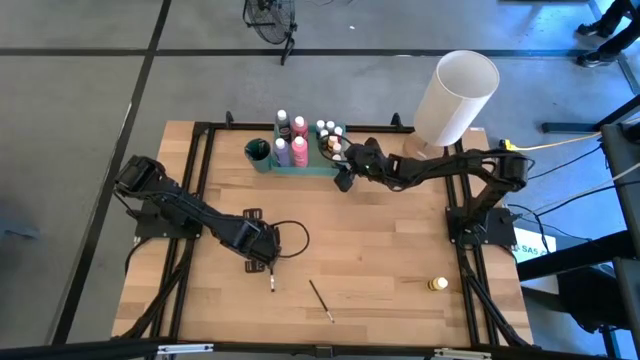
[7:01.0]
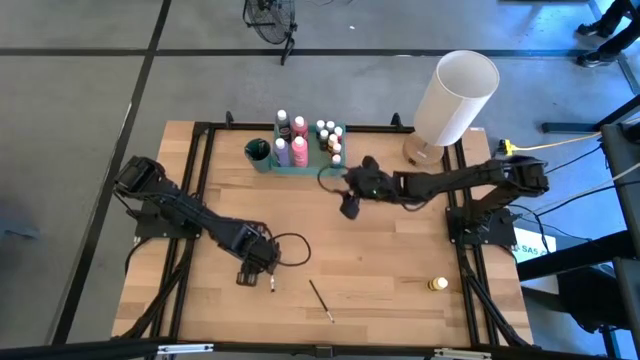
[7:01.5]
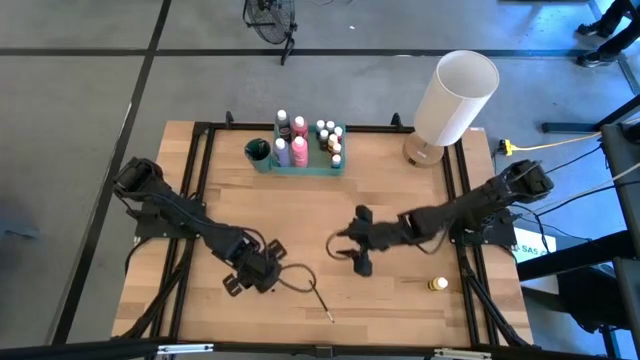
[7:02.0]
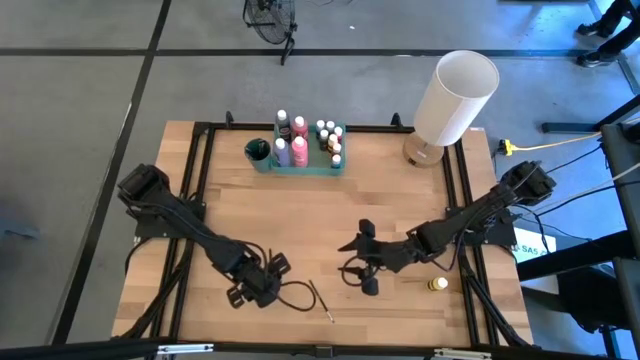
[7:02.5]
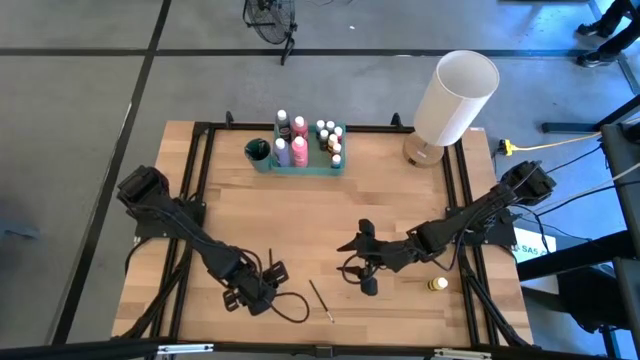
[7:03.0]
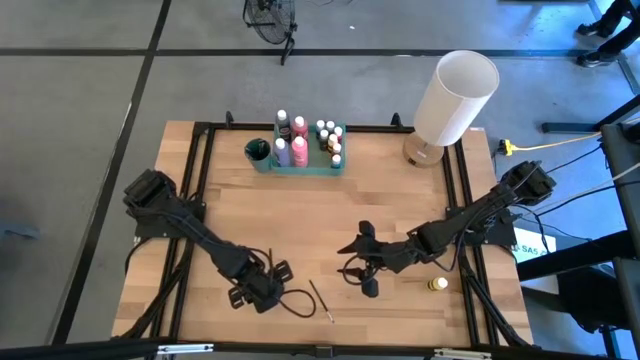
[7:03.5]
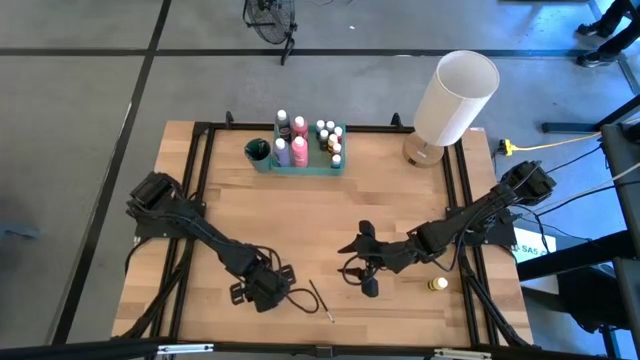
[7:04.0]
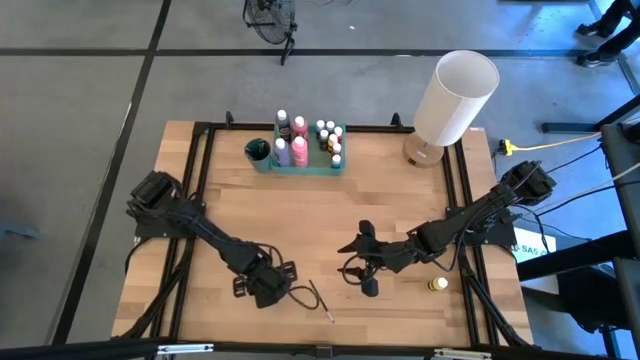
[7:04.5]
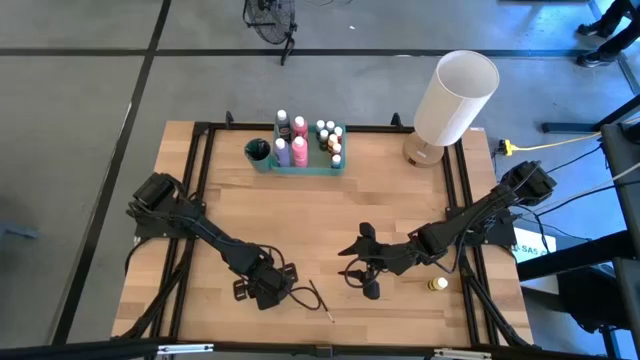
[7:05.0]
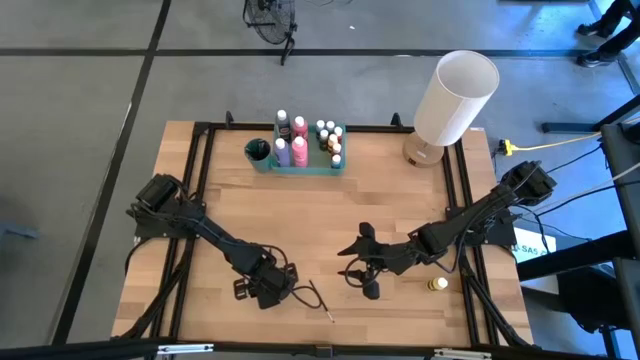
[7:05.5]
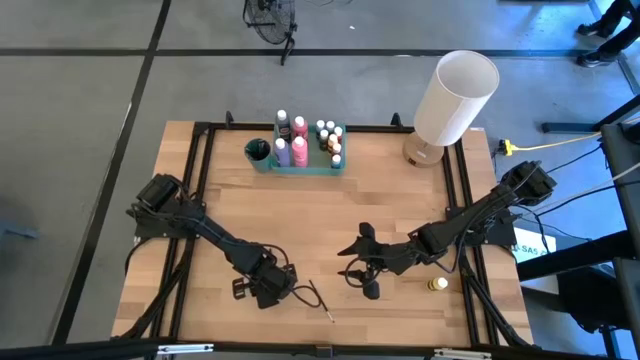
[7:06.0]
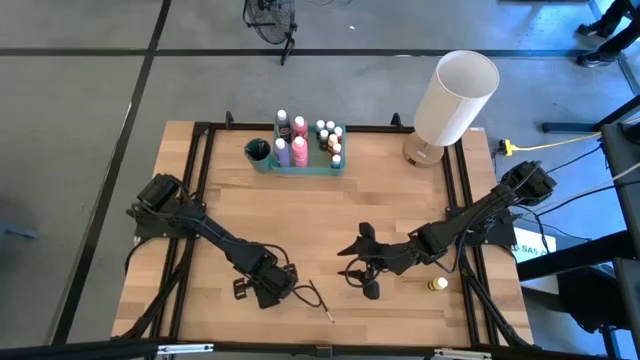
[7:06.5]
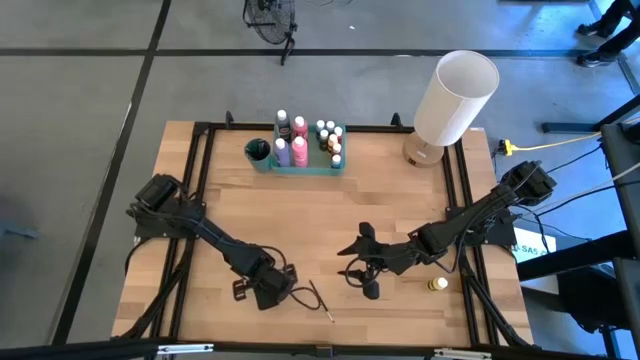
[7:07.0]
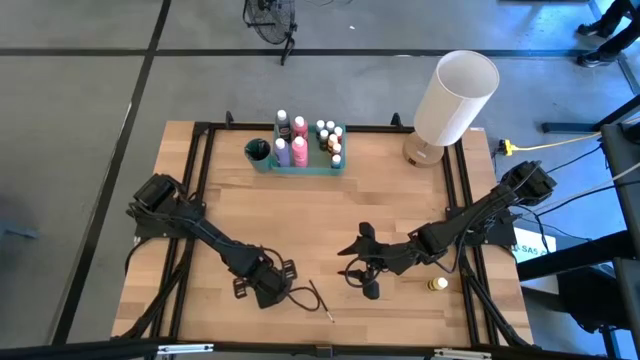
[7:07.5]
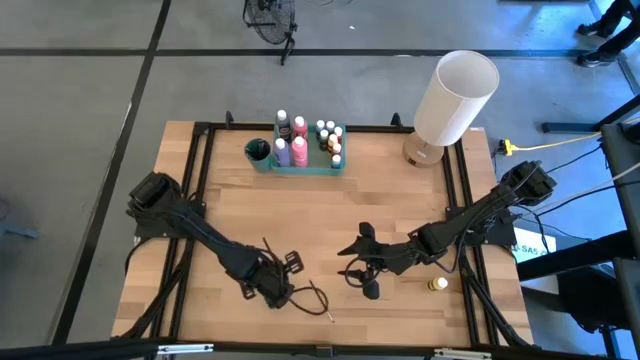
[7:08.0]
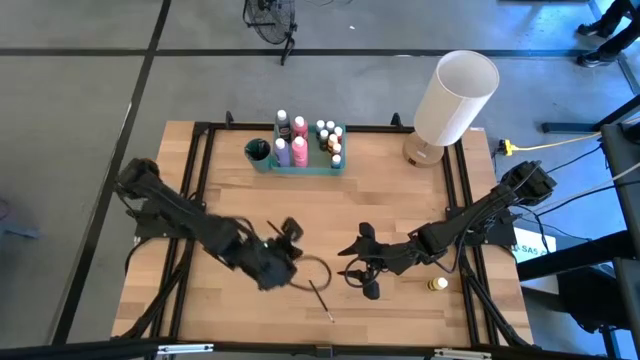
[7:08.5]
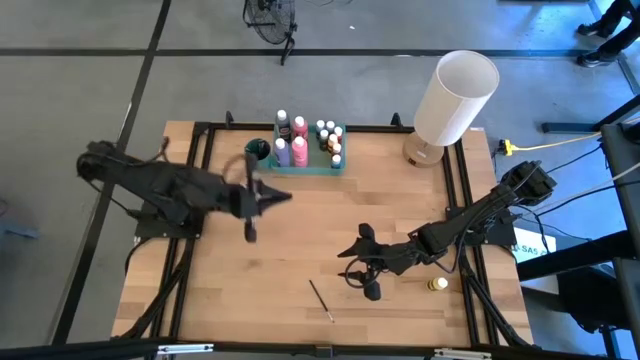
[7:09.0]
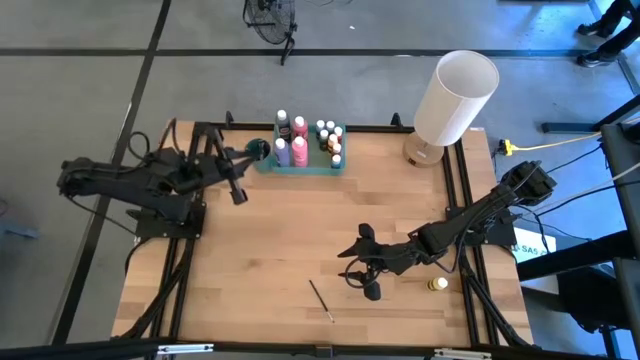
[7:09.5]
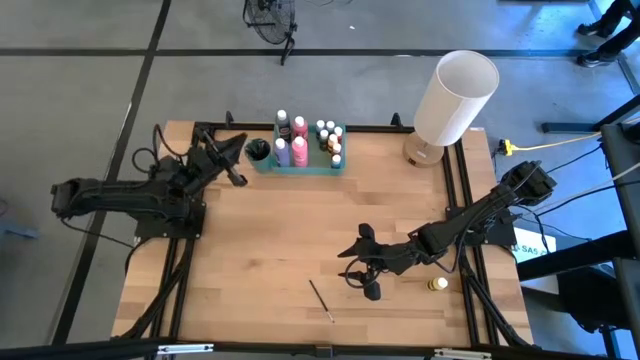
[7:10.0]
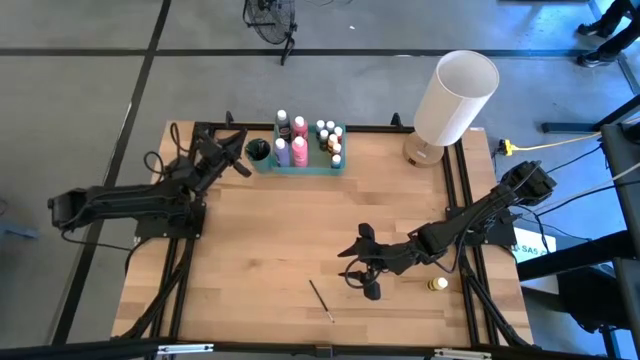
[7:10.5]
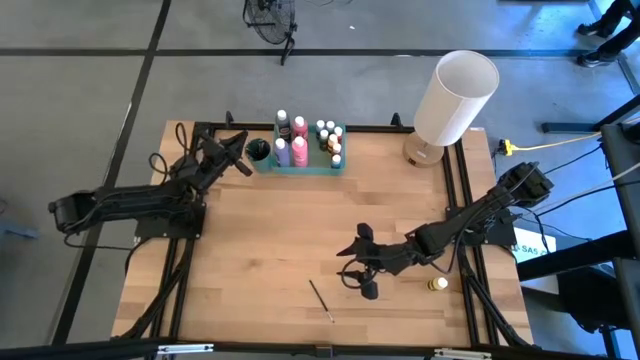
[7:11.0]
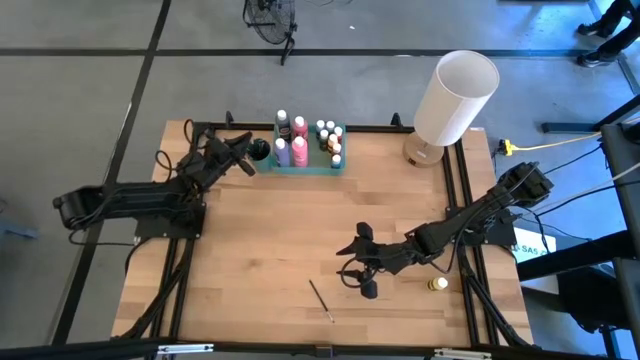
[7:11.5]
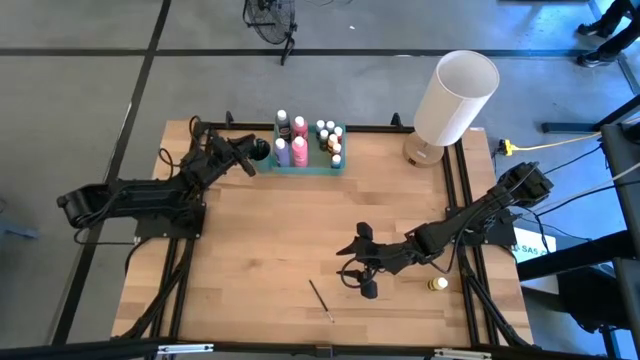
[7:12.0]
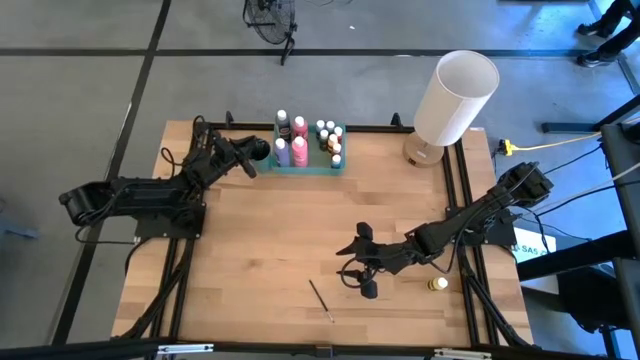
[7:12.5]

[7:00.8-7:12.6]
Task: Pick & Place Paint Supplies
Put the silver paintbrush into the green cup

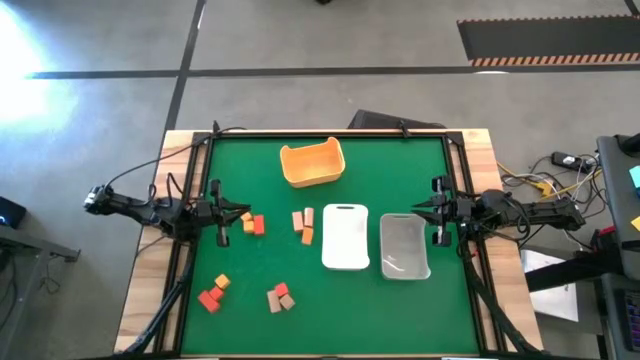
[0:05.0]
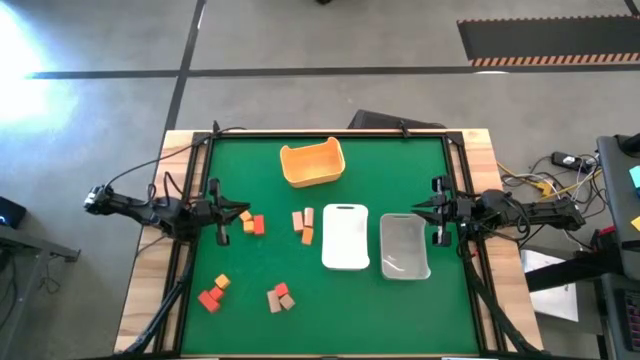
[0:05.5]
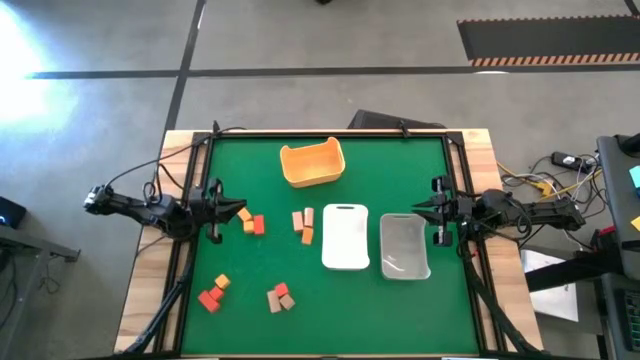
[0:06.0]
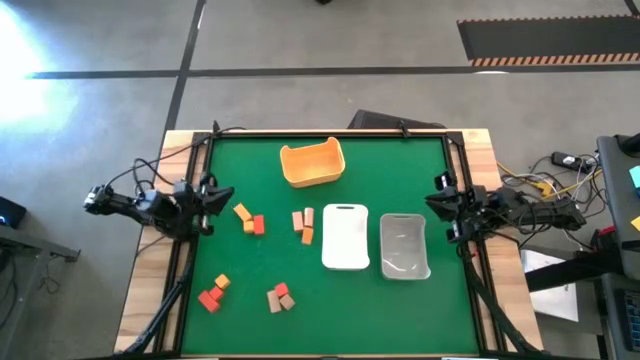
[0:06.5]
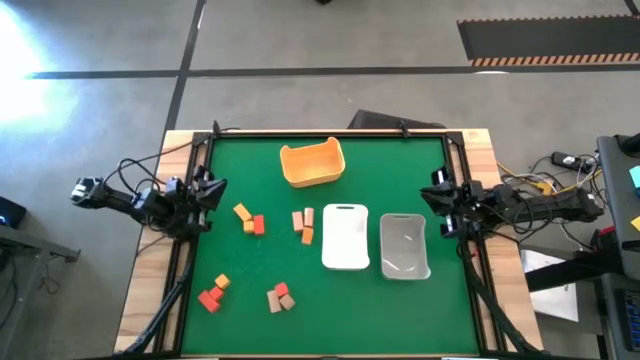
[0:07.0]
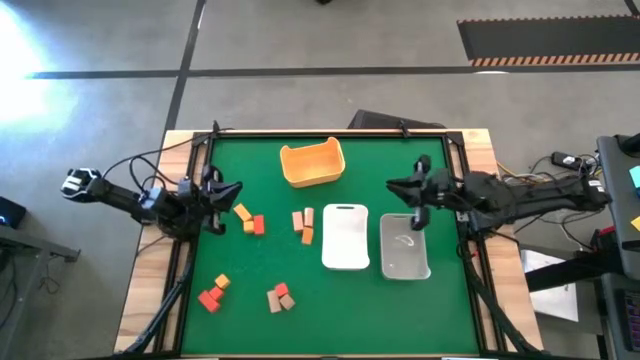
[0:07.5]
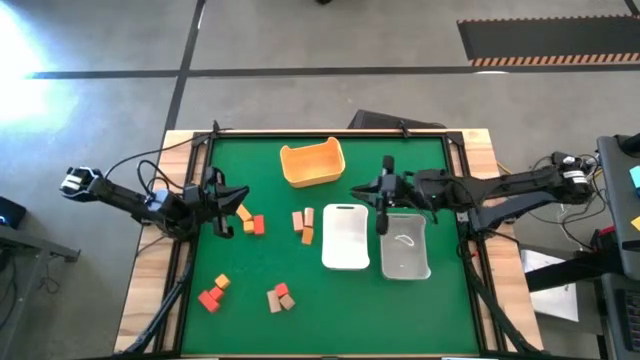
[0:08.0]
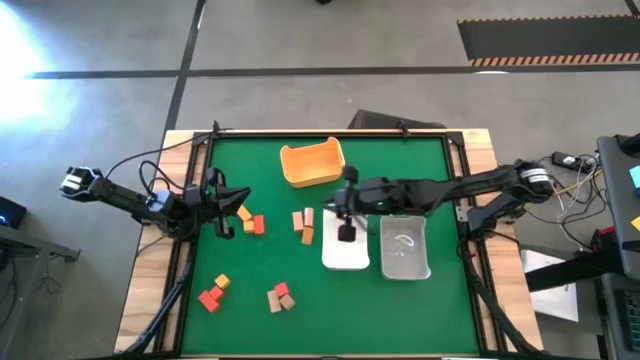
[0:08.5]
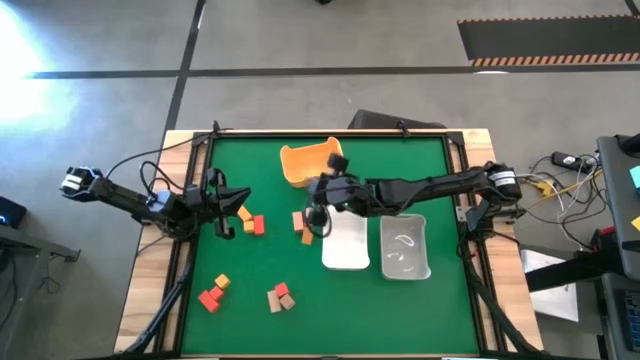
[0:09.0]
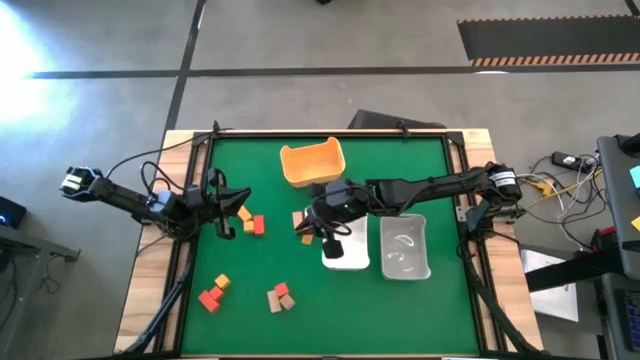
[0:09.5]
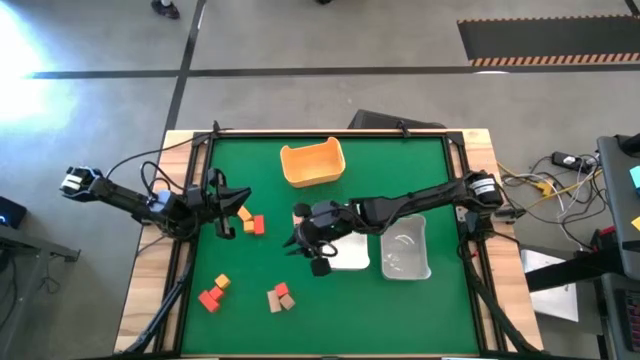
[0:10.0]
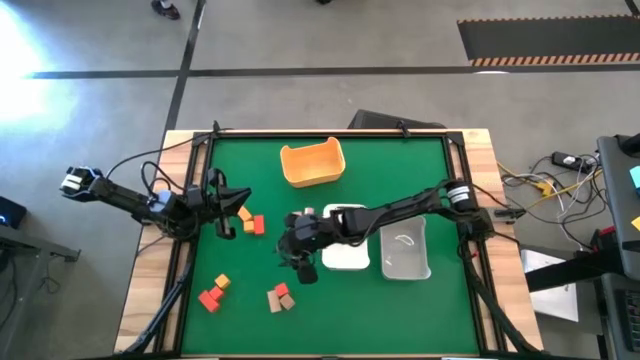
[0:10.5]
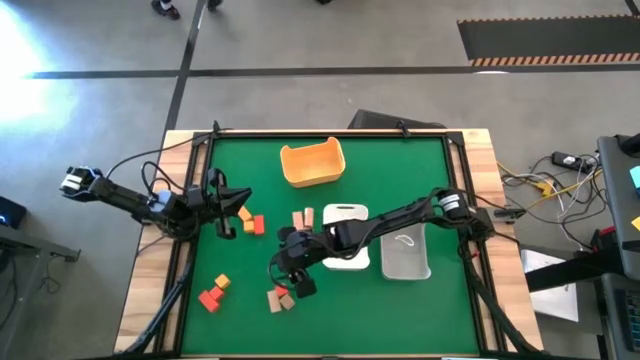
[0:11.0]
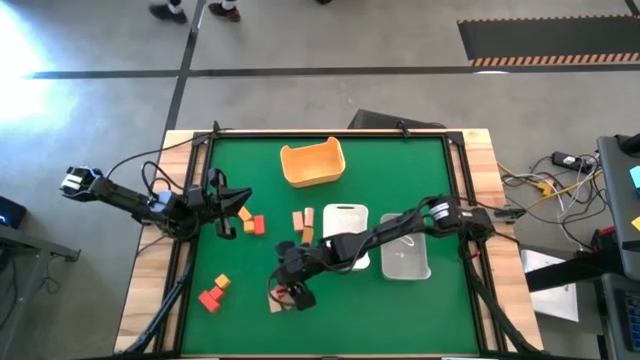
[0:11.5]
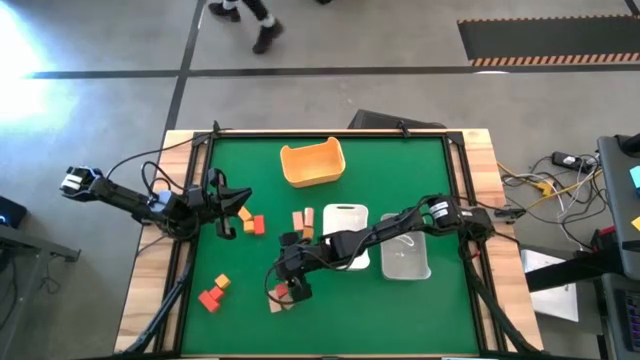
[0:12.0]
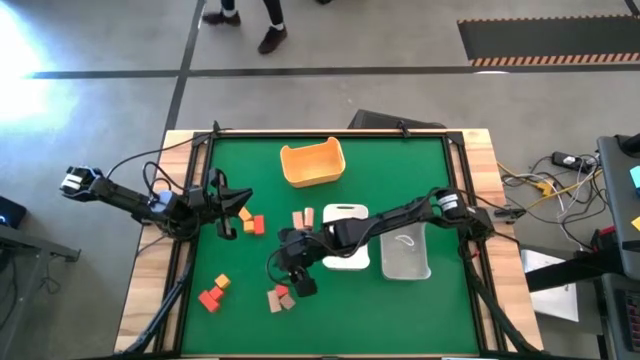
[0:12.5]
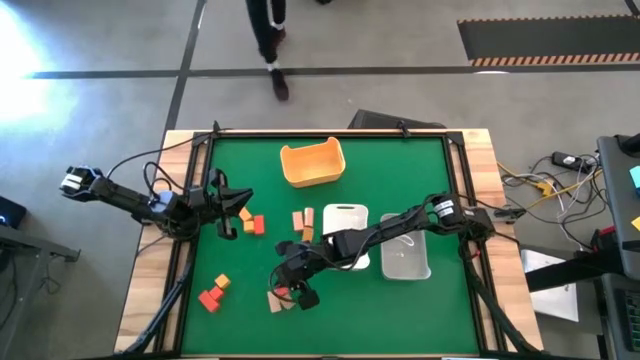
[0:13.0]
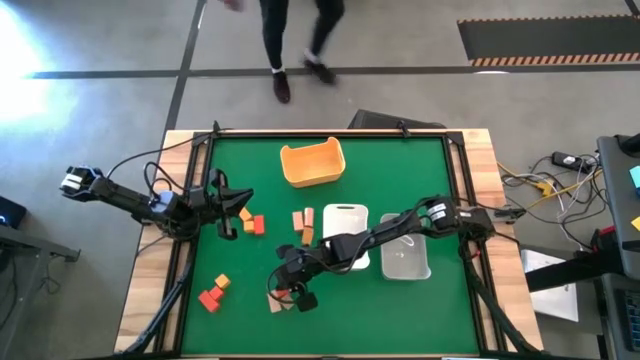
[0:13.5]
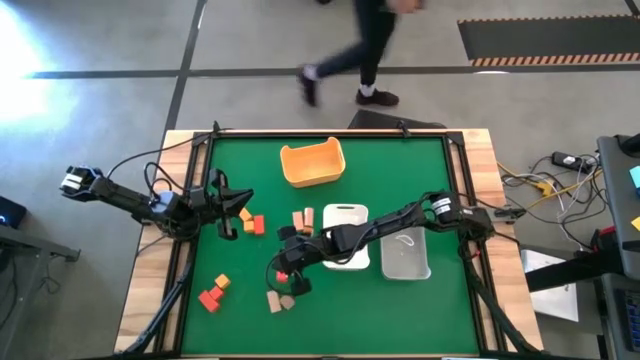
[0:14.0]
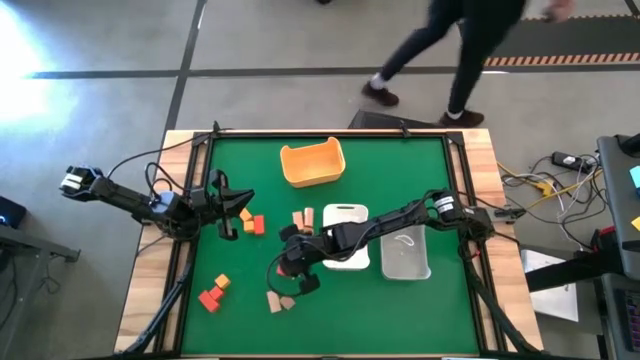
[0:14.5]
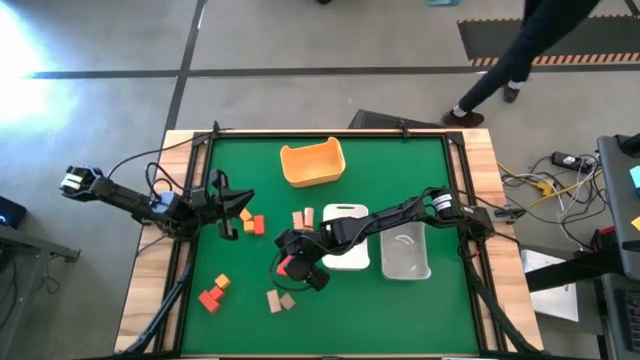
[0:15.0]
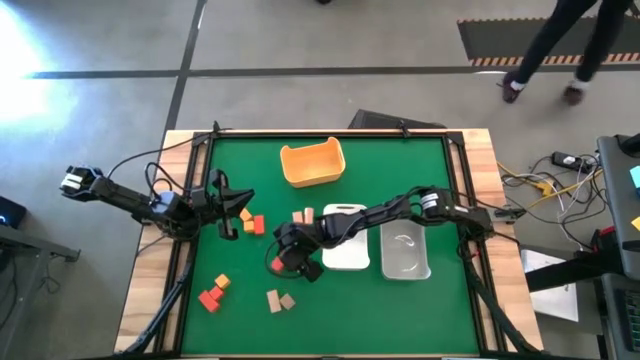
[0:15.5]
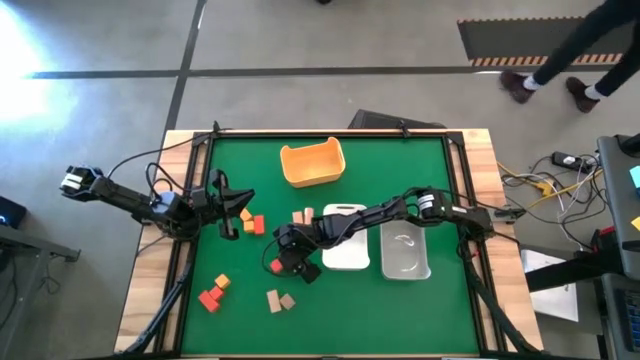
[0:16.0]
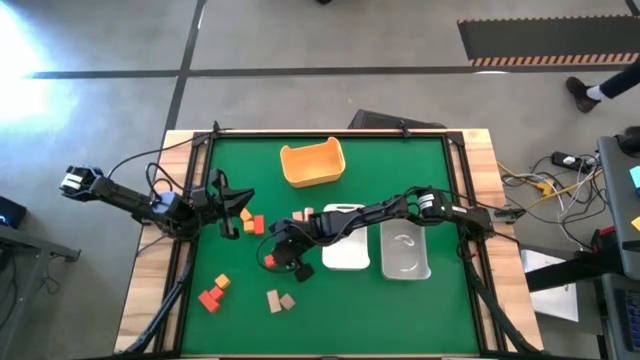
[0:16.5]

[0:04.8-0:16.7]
Task: Sort & place blocks by color
Put the red block into the white bin
